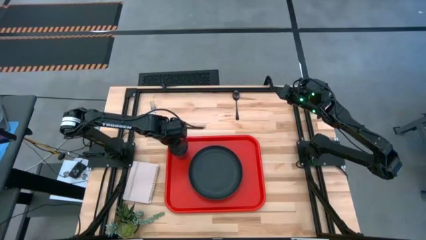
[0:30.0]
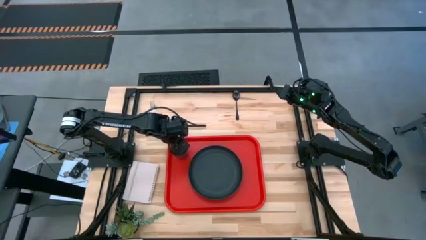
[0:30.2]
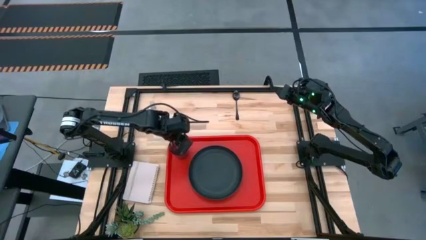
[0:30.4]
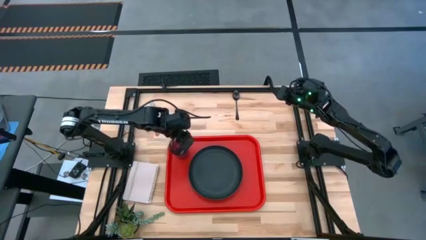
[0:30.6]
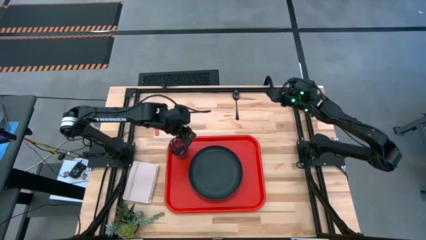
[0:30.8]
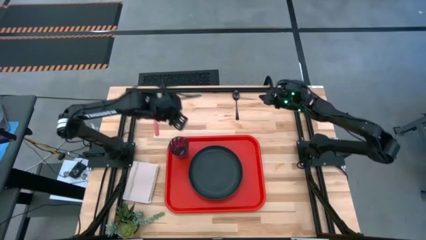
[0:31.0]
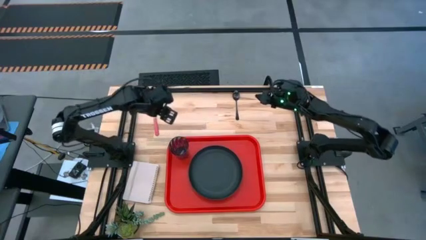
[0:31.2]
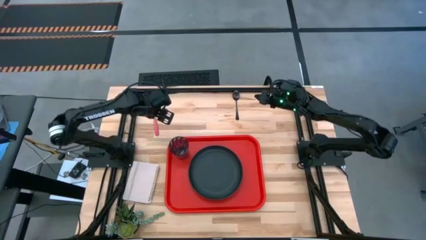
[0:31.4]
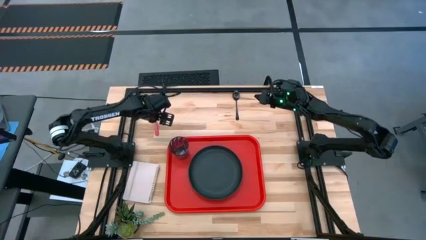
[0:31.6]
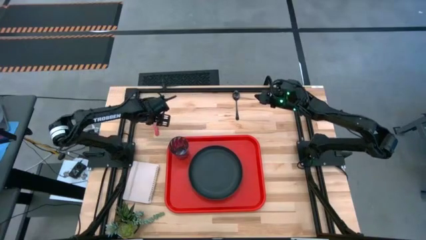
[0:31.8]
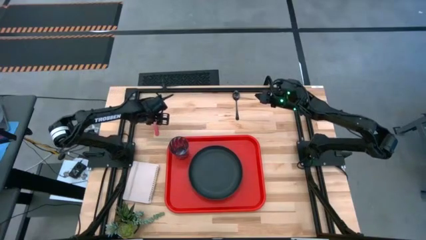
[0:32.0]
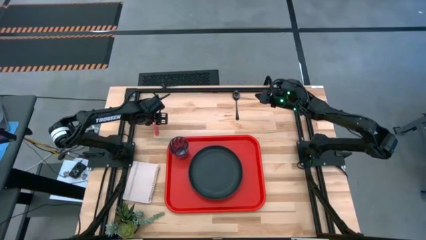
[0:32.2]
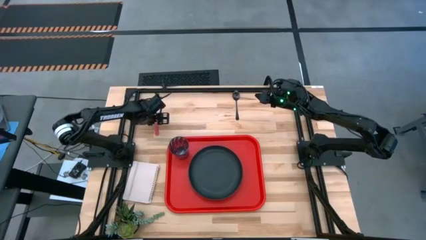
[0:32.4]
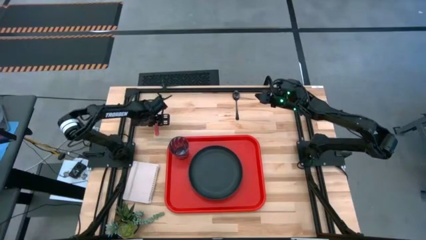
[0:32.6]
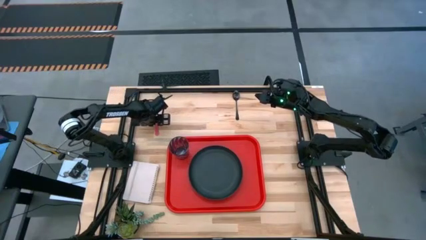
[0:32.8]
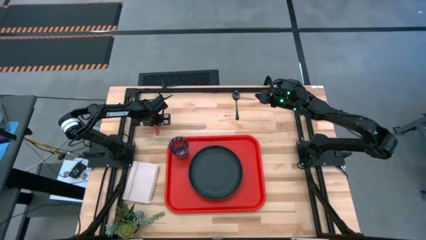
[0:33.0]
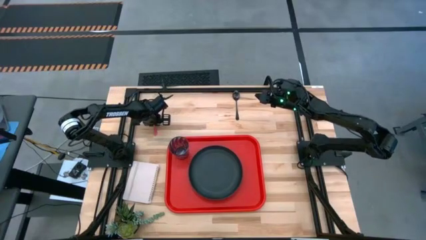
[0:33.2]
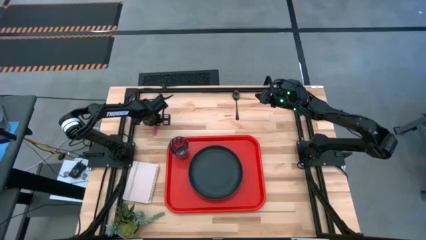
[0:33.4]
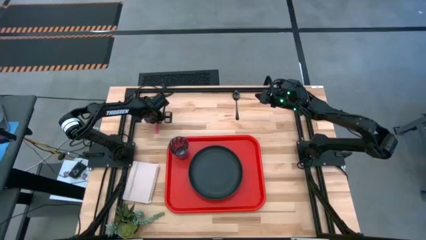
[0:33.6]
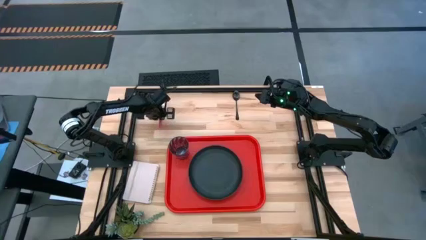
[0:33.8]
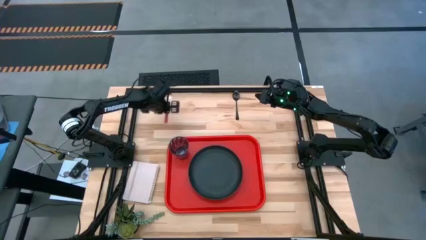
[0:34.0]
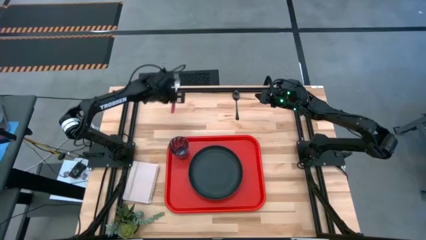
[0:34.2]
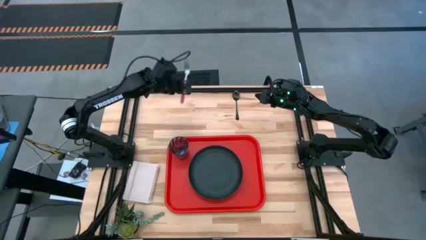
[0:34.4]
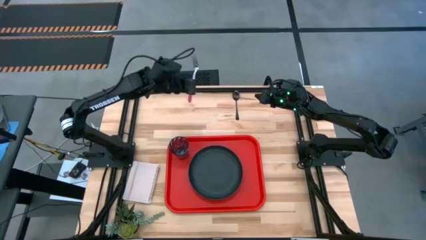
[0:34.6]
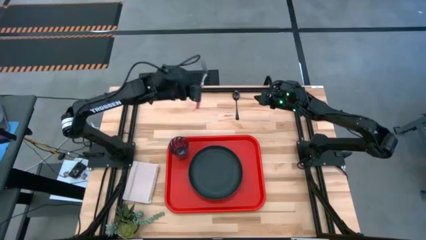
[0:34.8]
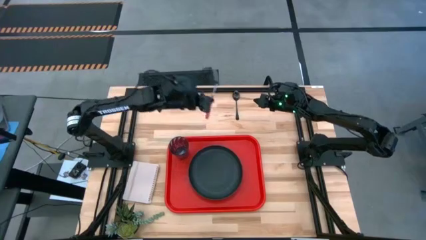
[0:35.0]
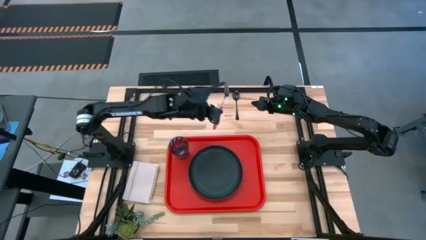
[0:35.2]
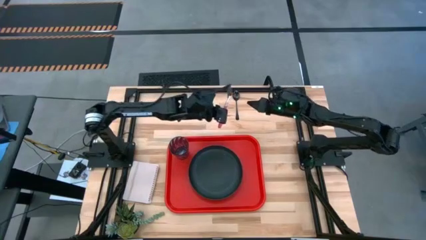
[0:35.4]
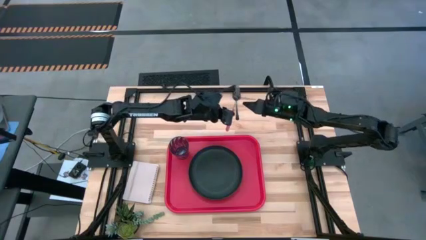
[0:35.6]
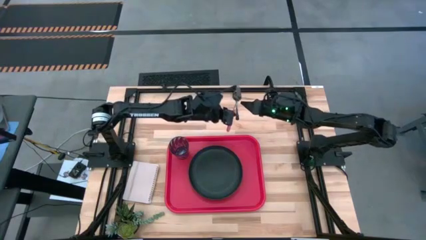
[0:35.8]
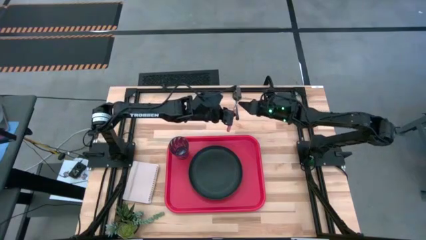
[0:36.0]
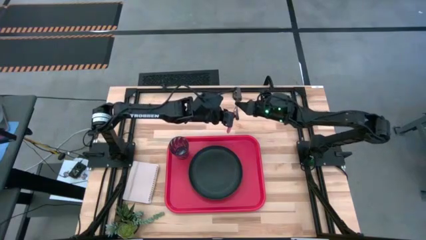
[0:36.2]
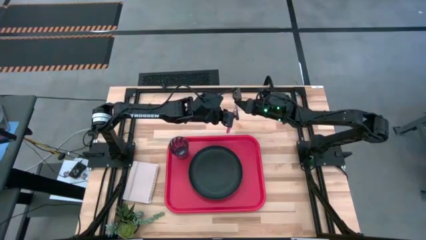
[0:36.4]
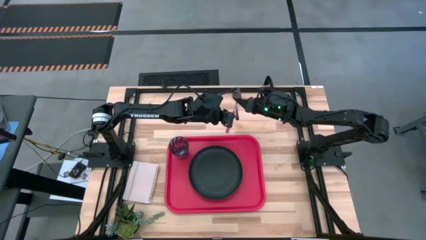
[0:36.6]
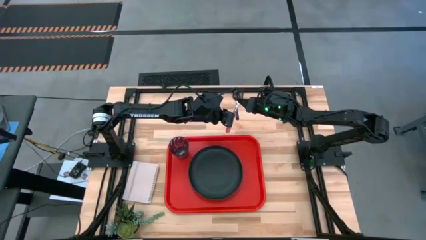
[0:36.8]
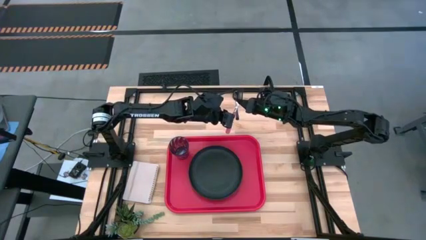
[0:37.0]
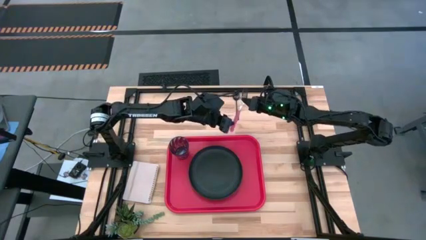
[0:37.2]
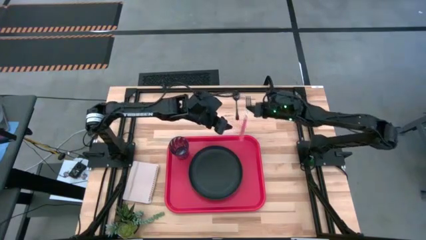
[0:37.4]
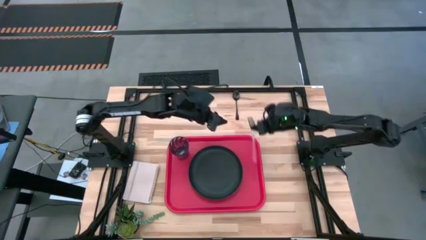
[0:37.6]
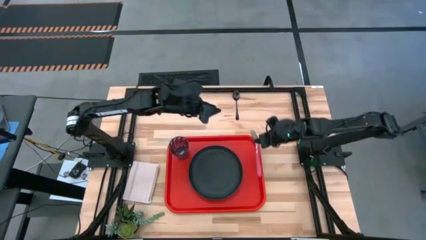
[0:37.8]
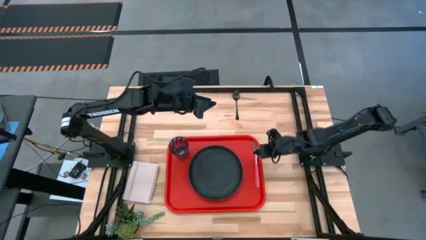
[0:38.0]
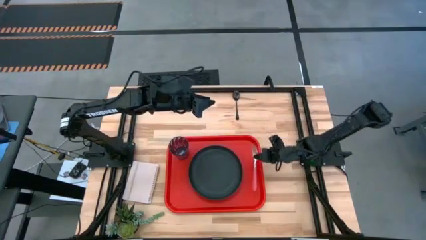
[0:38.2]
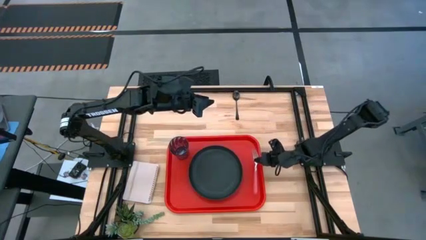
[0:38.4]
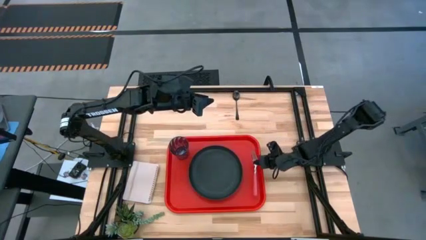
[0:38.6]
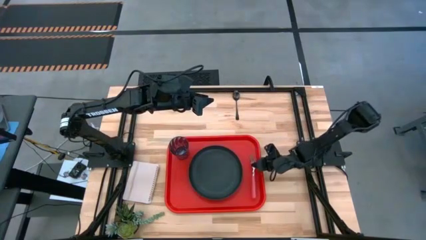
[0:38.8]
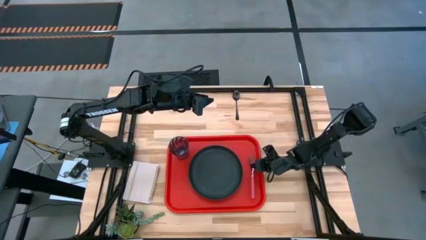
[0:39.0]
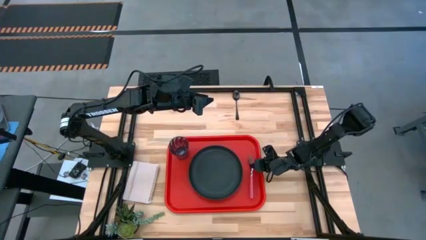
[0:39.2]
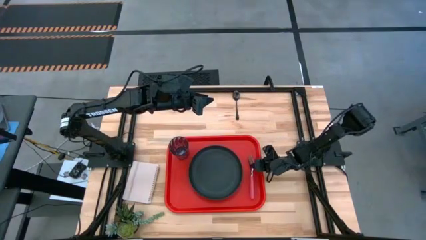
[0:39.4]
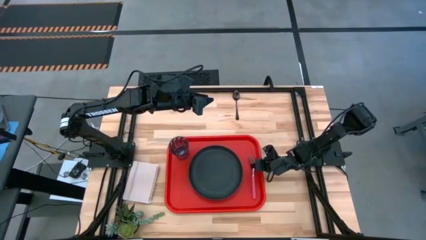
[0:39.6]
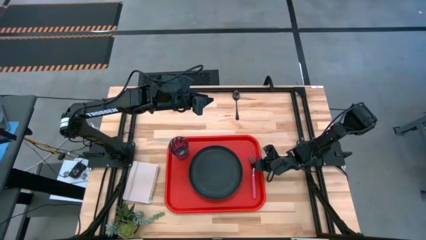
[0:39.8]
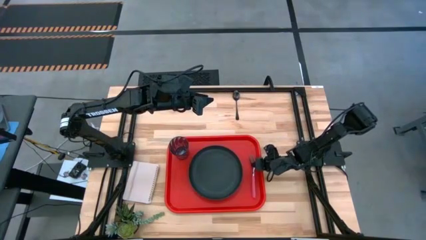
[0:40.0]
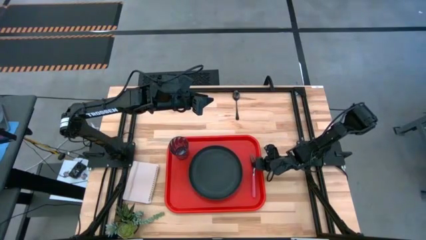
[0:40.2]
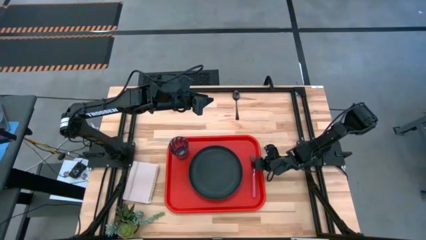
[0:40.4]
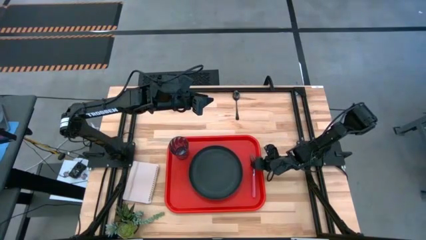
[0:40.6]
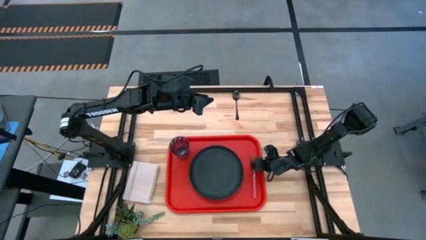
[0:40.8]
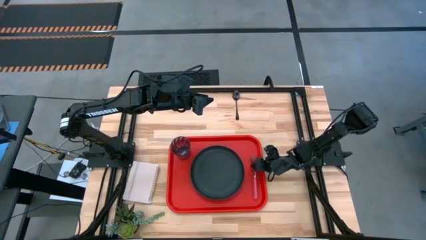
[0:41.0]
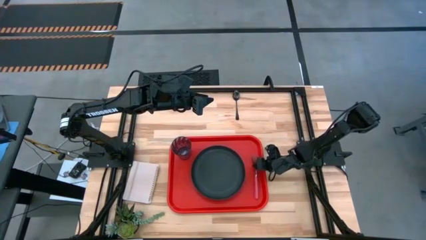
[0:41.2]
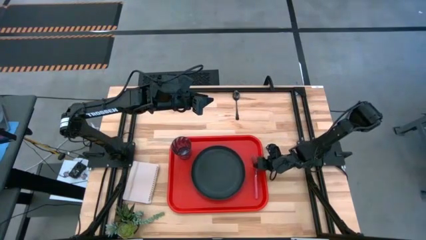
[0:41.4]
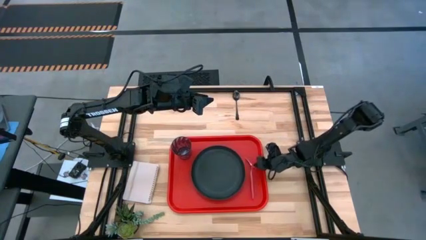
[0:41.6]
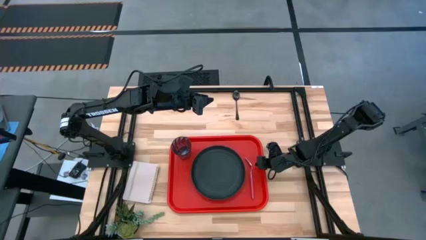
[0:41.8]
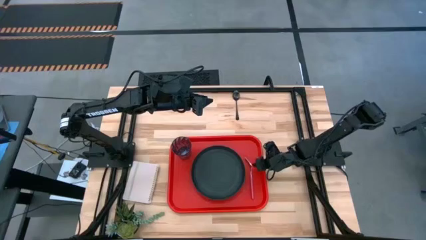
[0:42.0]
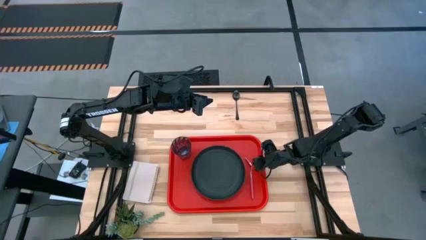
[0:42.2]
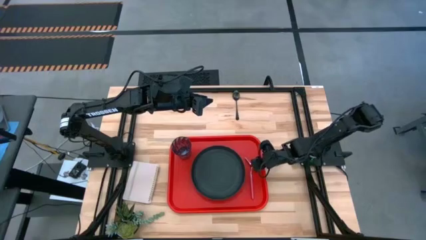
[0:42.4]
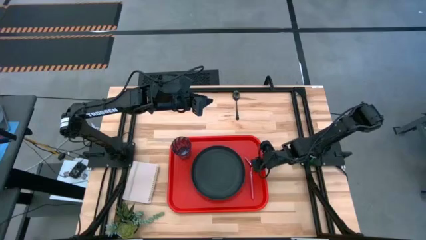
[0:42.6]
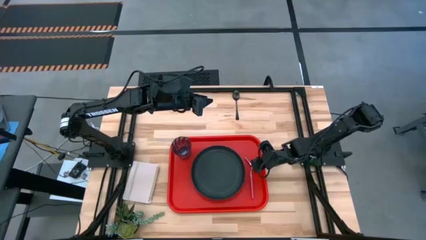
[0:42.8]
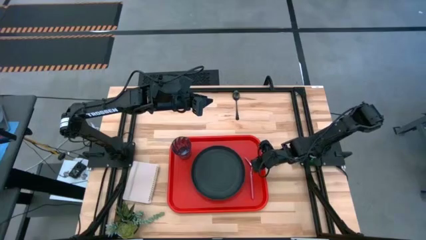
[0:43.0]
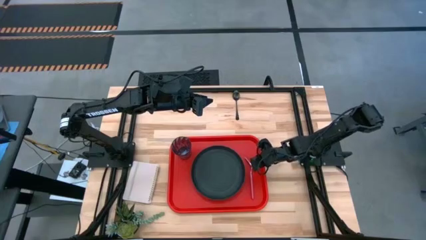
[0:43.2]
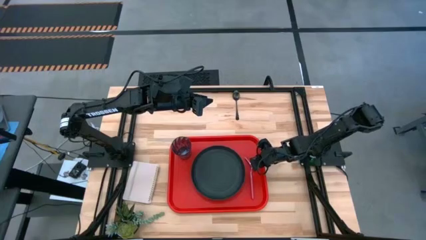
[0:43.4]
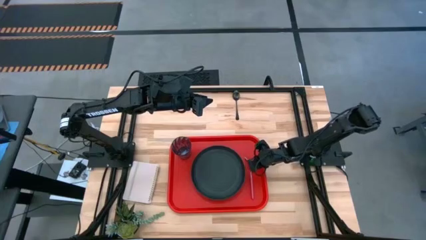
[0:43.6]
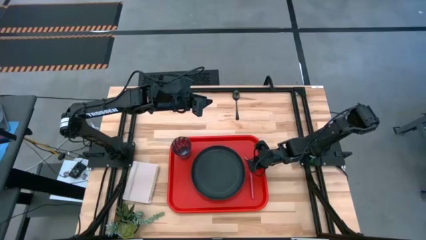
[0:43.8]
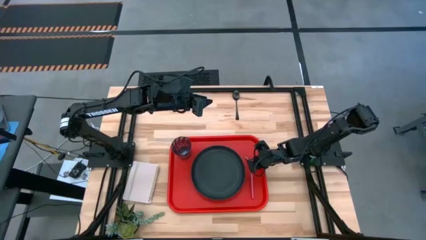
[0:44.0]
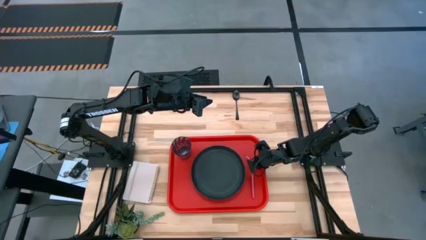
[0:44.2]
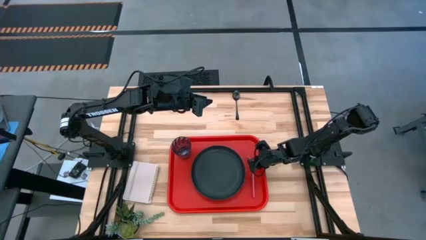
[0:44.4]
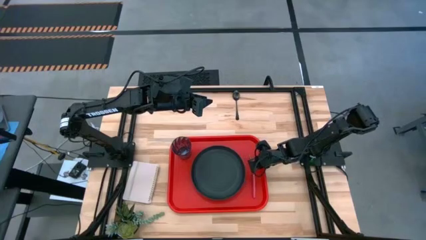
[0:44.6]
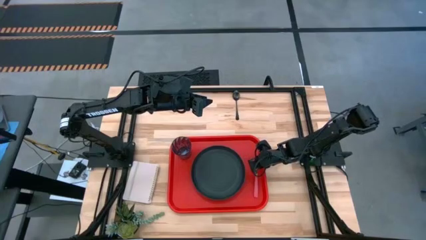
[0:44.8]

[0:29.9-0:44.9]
Task: Pick and place plate/cup/fork/spoon on tray
Put the pink fork on the orange serving tray to the right of the black plate

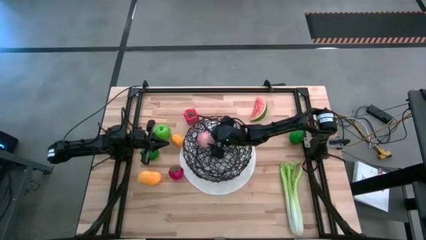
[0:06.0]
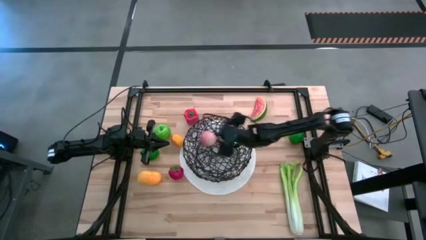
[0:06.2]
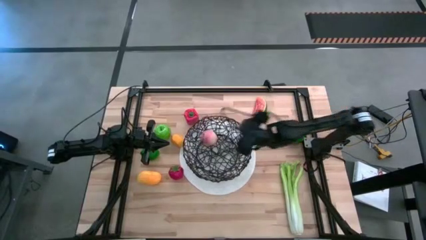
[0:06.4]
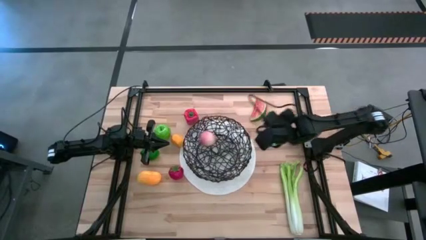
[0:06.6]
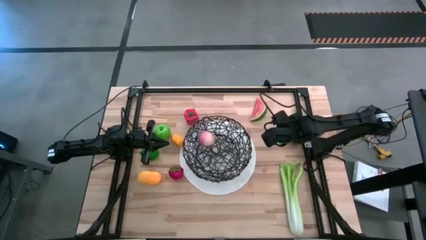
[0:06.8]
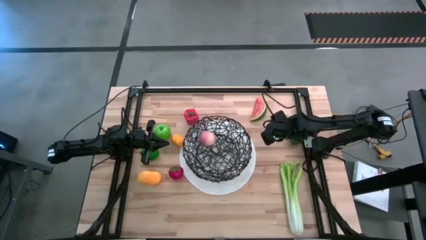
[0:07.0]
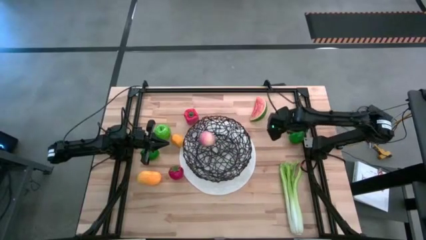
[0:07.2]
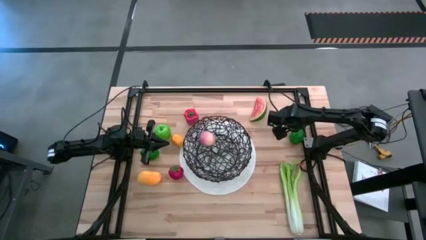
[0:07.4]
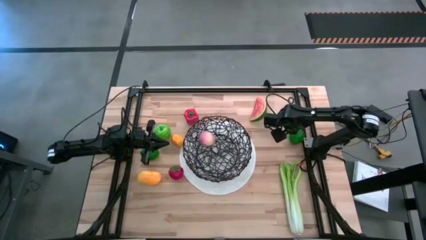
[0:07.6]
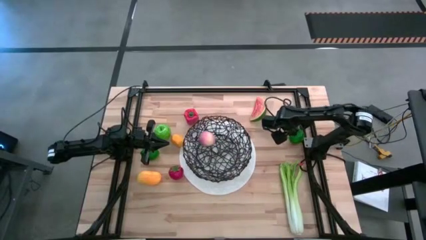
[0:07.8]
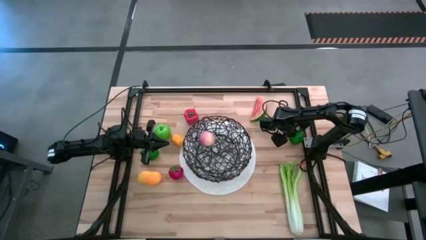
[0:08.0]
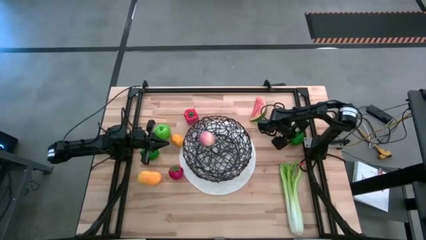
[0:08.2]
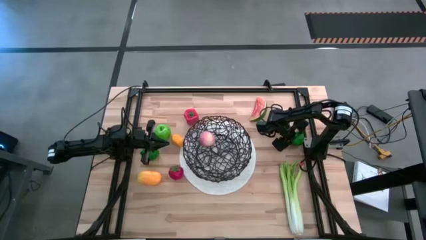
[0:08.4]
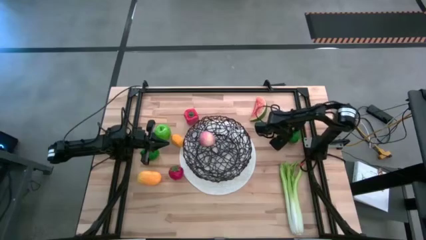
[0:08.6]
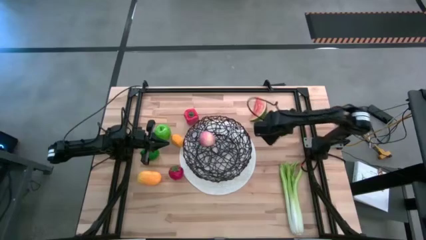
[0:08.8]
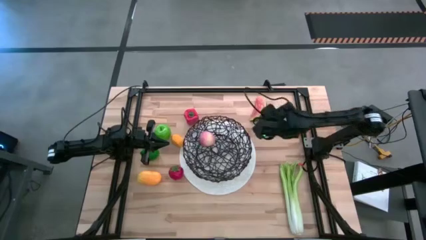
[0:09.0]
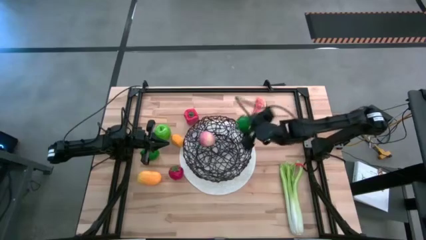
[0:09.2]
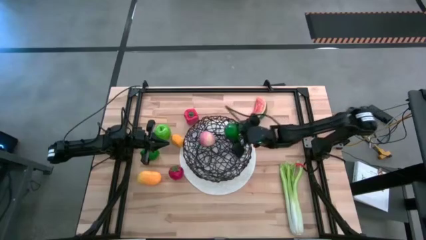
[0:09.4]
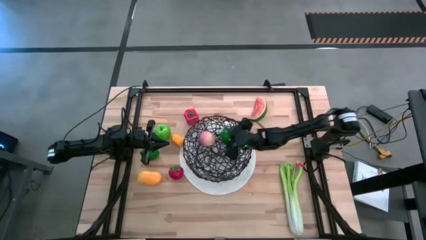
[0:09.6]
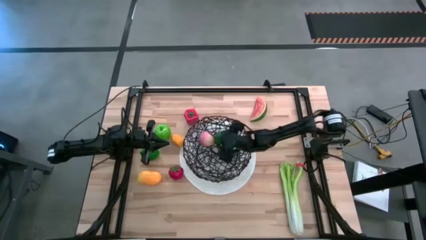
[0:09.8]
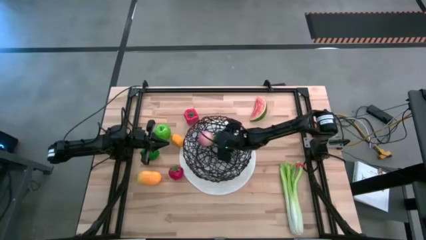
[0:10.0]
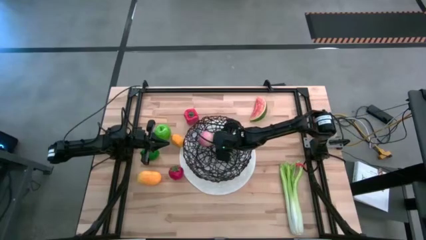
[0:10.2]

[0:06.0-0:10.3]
Task: Build produce basket
Put the right green lime into the wire basket
